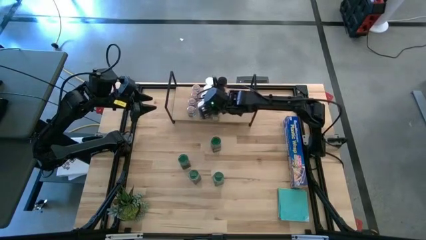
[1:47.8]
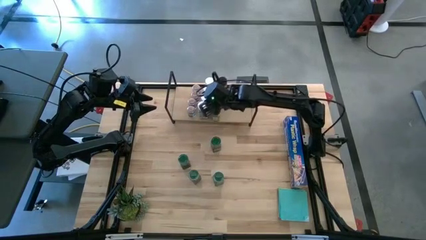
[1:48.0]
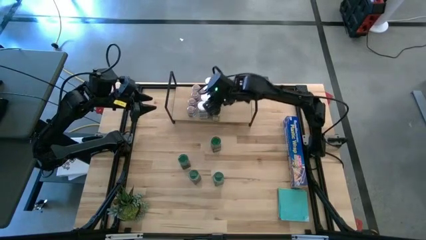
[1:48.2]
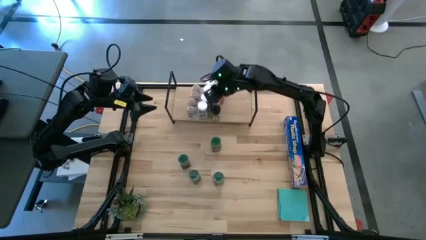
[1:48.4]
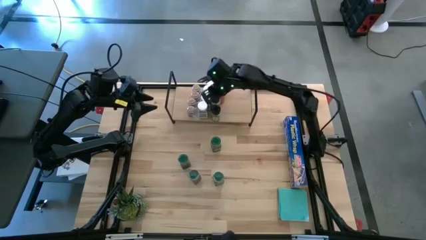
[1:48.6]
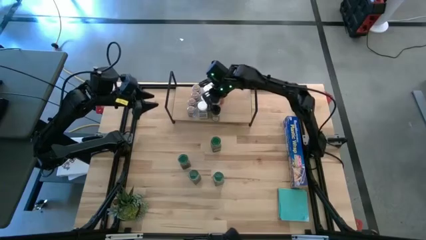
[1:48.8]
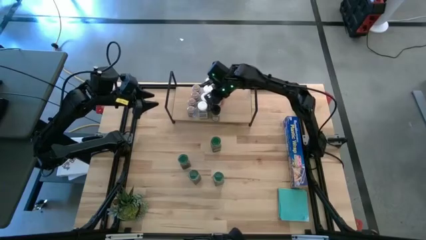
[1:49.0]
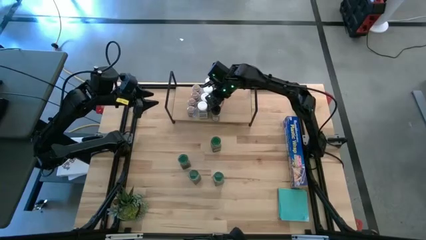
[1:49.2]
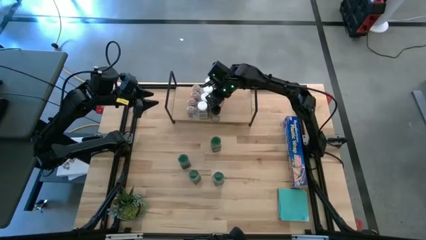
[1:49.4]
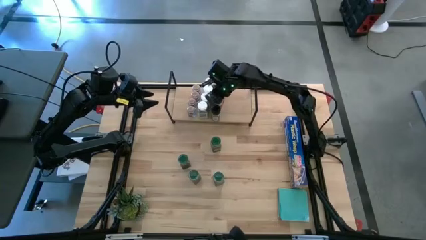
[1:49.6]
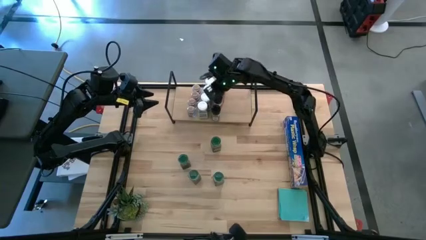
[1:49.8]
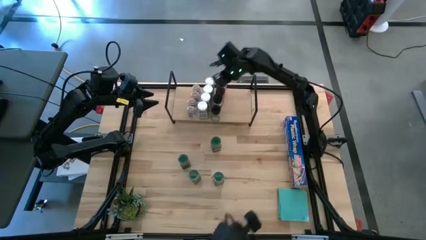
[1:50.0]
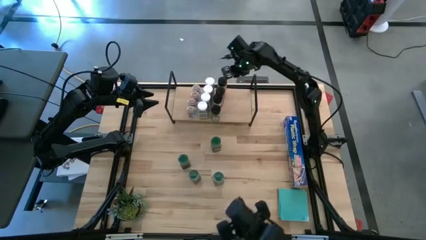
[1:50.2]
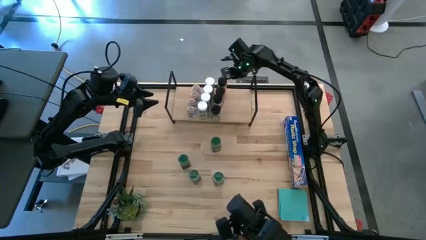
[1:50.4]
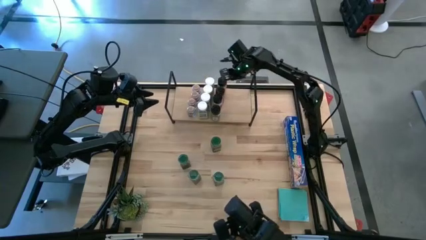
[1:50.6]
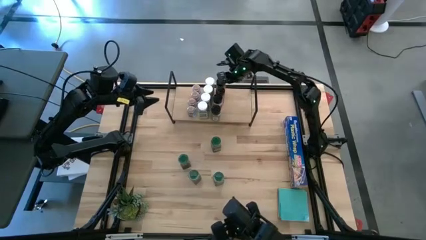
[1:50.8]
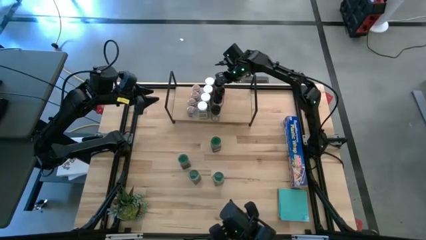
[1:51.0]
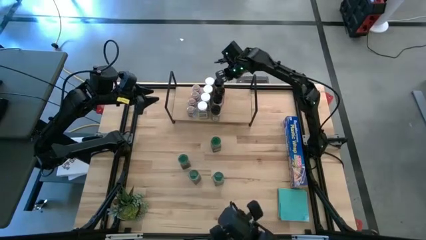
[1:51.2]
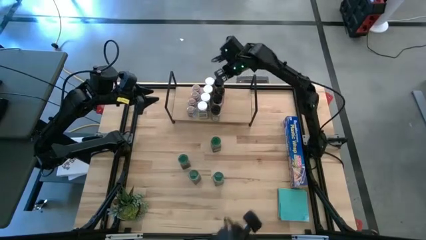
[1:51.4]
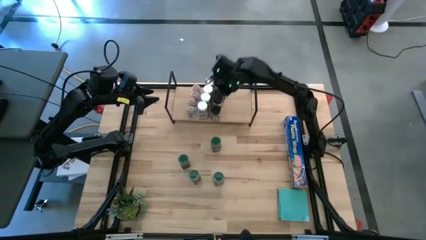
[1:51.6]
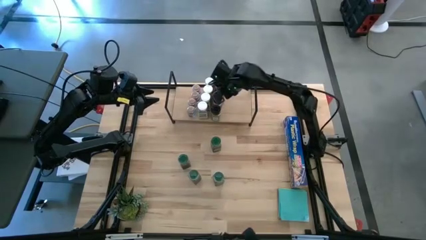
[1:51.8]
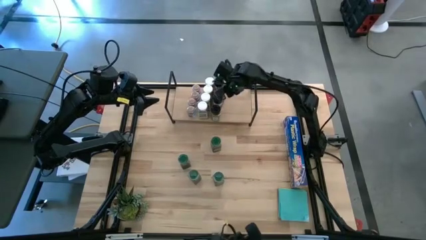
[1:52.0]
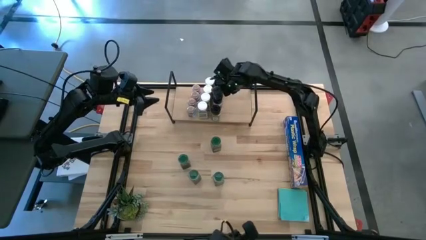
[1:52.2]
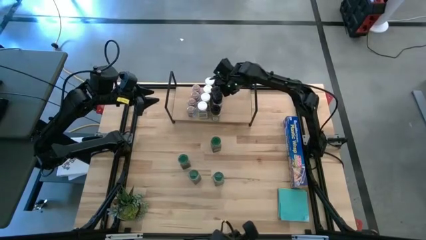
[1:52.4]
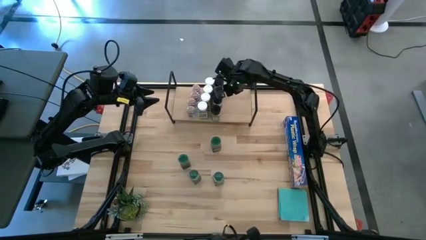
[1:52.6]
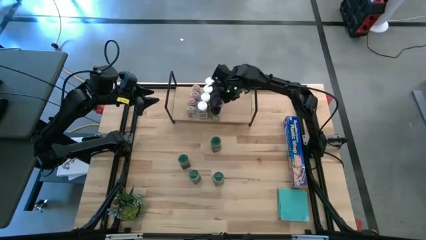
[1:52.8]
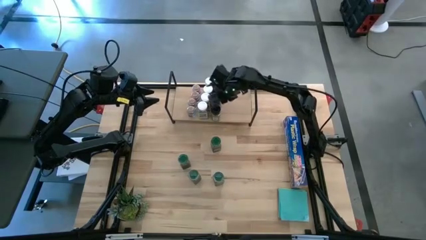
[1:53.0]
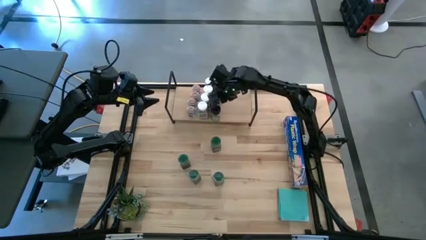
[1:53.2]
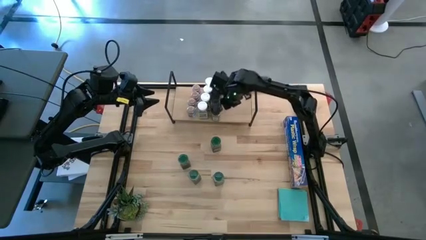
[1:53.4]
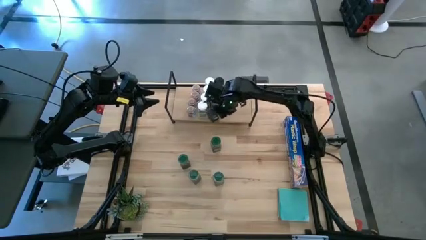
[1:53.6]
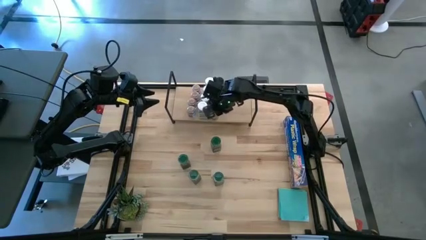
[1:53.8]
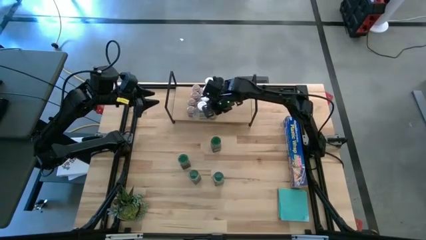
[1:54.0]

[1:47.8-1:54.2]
Task: Shelf spices
Adjust the black seasoning bottles on the shelf

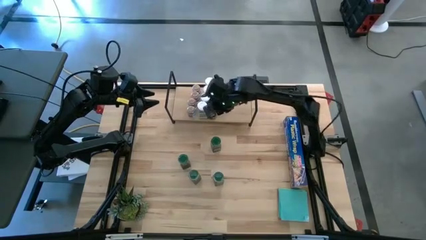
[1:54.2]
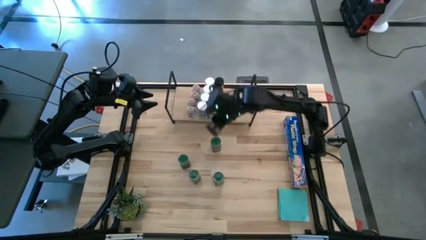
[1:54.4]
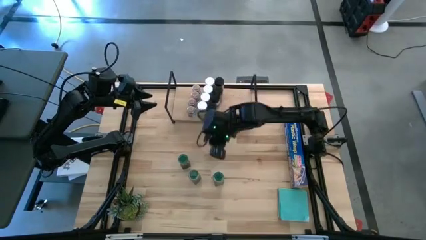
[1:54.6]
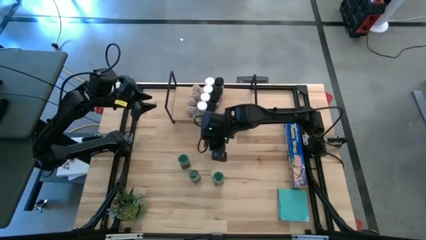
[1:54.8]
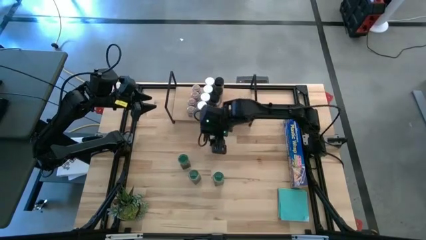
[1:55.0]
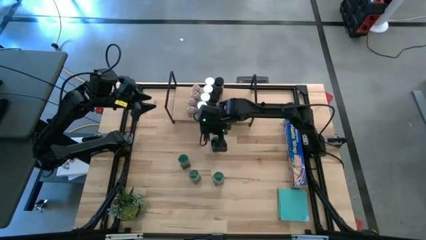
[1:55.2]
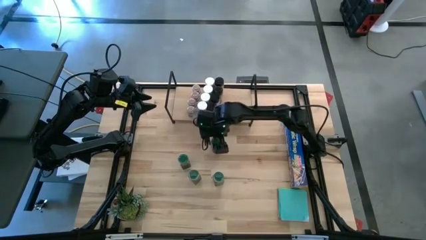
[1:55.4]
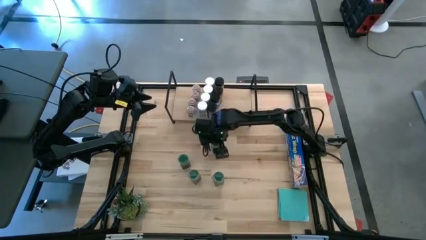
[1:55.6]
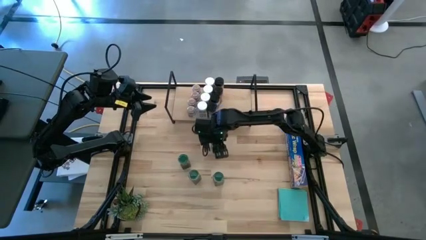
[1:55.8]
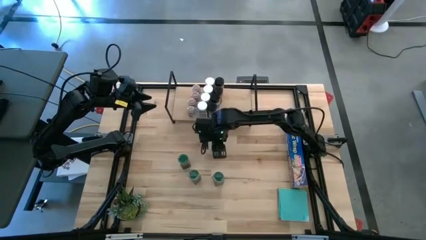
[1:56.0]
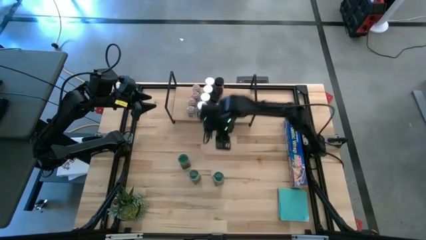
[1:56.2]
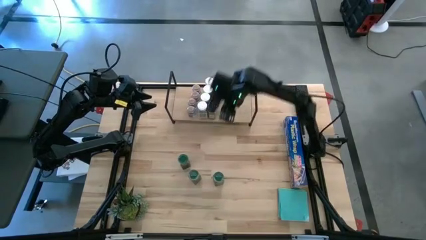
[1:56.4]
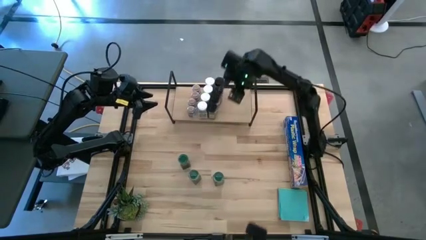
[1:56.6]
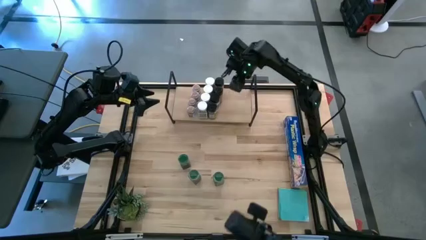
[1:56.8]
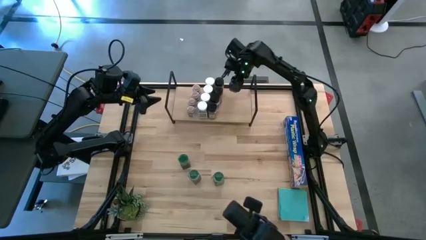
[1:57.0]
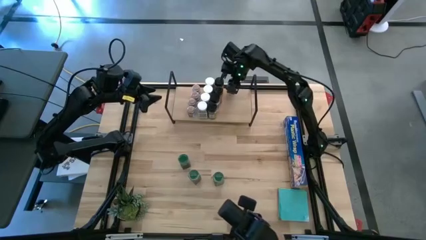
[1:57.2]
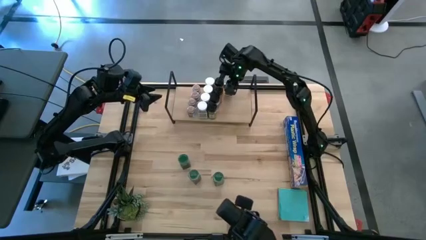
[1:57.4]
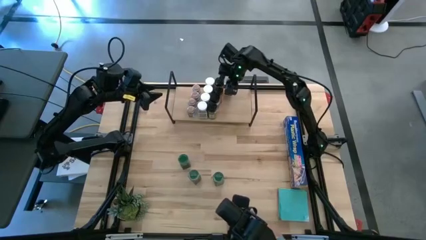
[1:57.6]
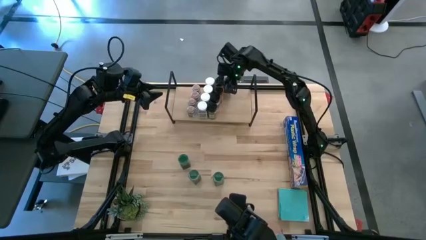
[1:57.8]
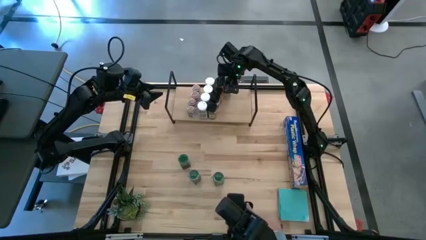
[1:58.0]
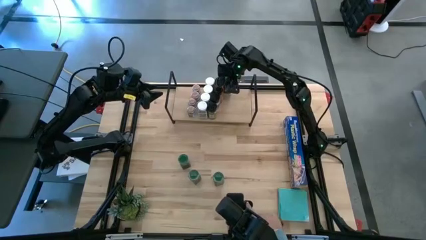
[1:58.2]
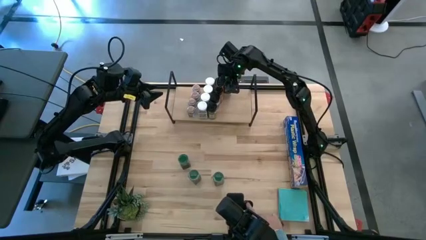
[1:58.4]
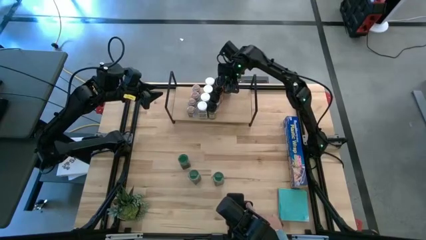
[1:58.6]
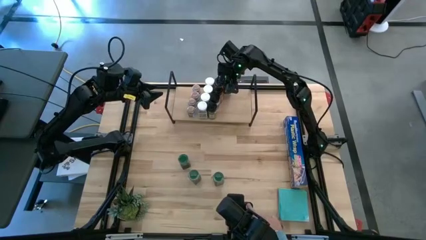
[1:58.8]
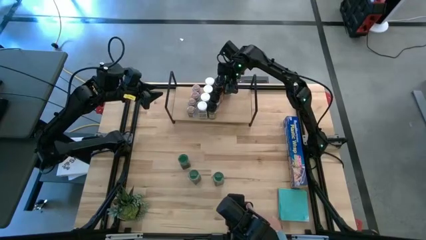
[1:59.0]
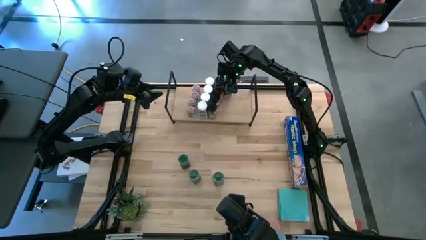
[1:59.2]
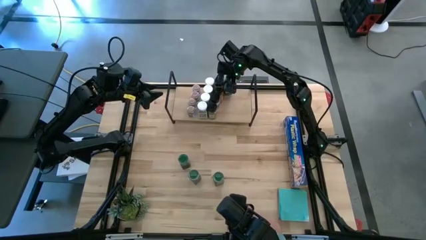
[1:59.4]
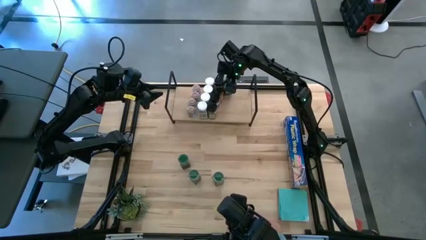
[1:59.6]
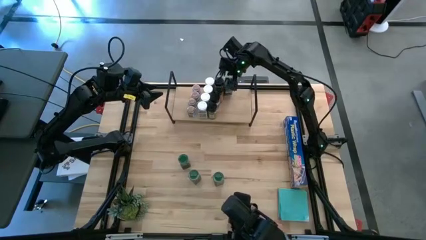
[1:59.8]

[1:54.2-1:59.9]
Put the top right green seasoning bottle on the shelf

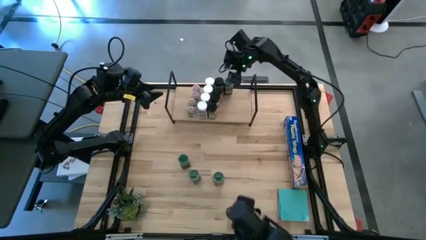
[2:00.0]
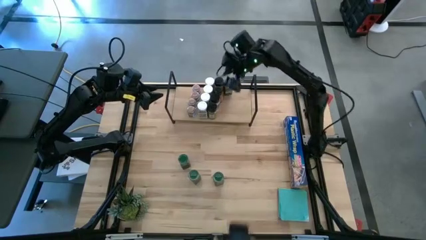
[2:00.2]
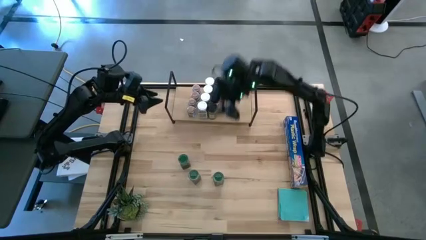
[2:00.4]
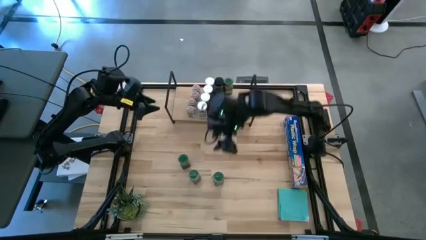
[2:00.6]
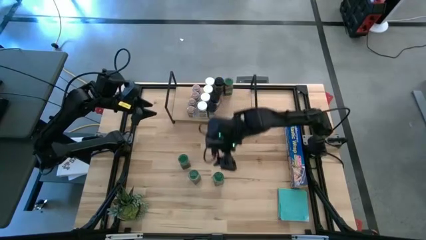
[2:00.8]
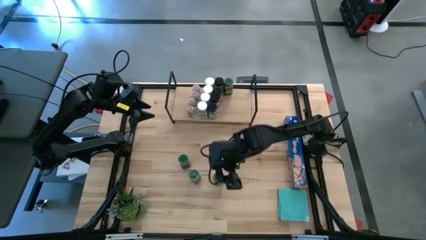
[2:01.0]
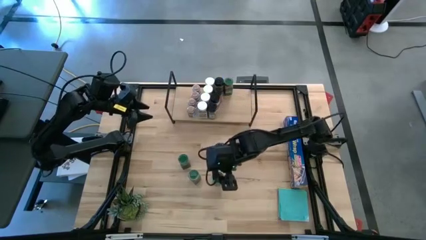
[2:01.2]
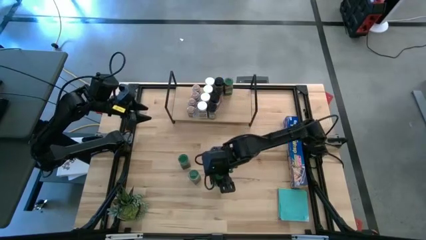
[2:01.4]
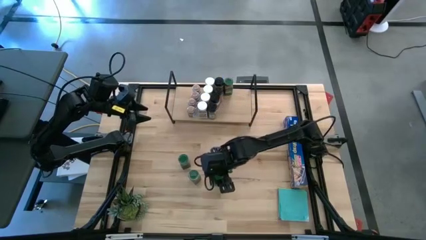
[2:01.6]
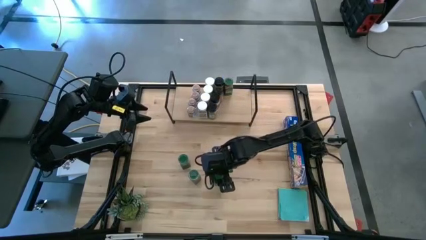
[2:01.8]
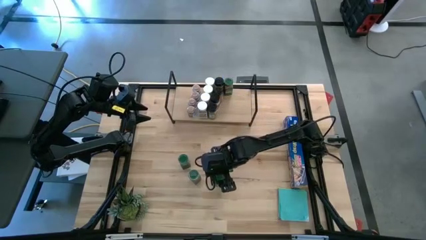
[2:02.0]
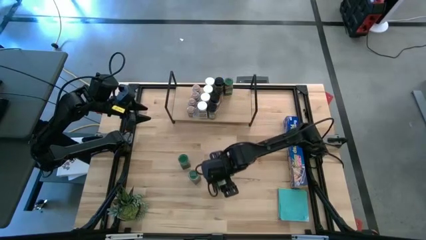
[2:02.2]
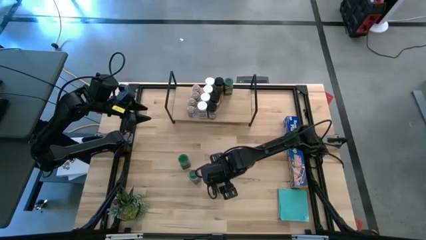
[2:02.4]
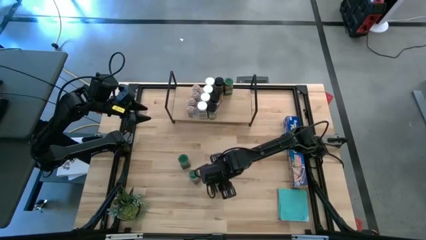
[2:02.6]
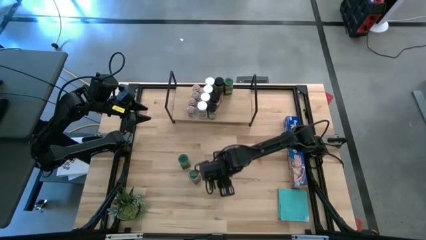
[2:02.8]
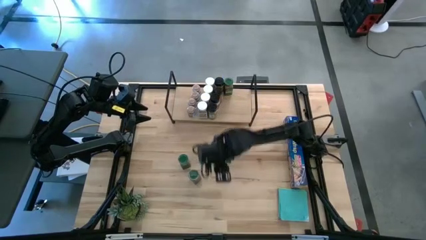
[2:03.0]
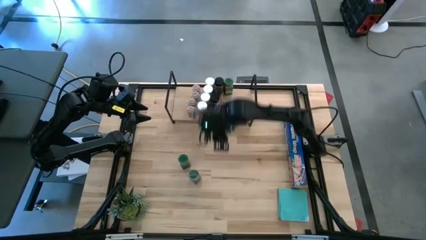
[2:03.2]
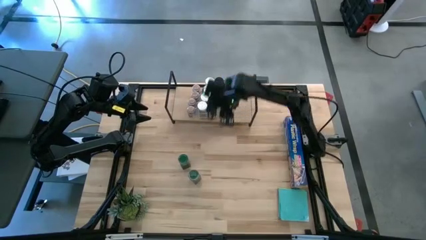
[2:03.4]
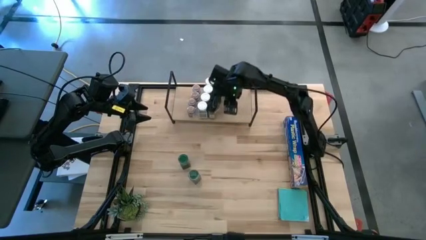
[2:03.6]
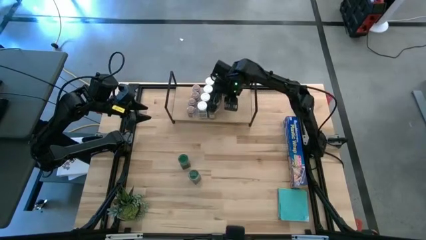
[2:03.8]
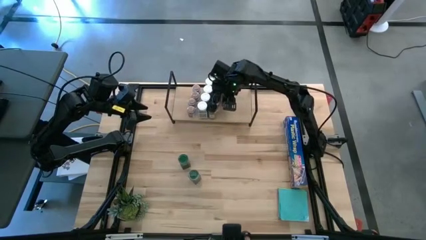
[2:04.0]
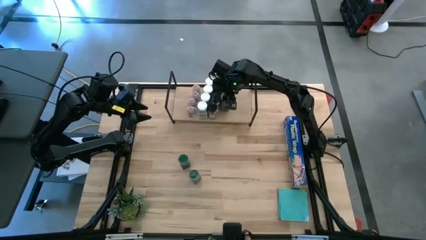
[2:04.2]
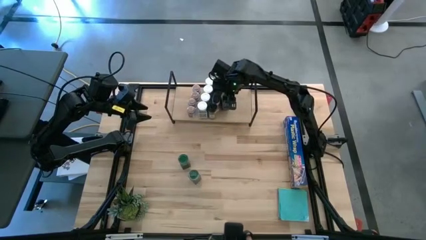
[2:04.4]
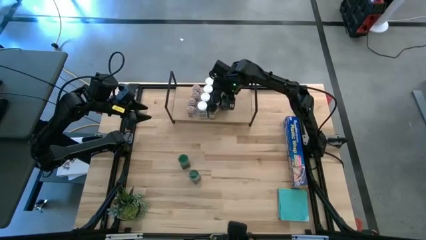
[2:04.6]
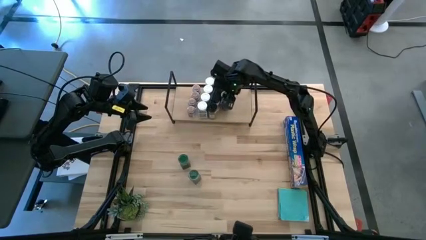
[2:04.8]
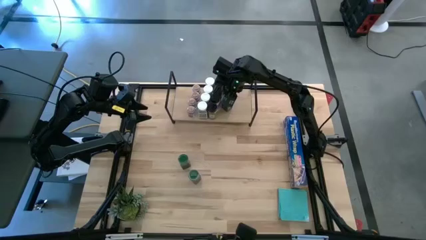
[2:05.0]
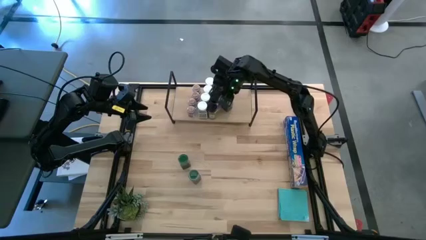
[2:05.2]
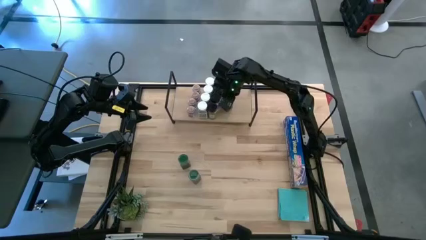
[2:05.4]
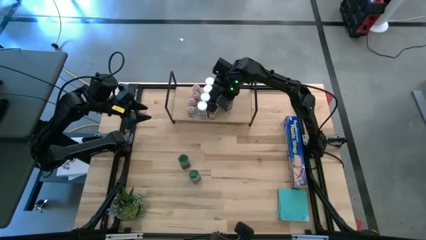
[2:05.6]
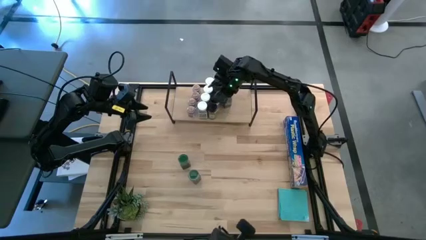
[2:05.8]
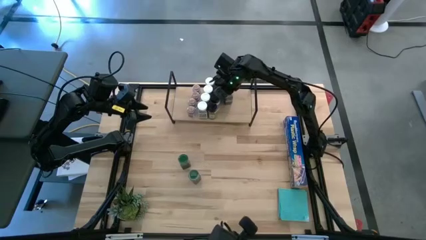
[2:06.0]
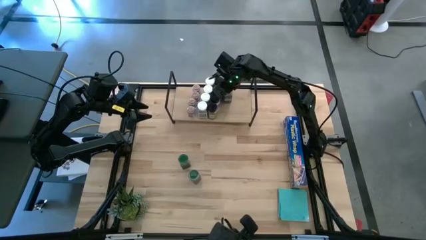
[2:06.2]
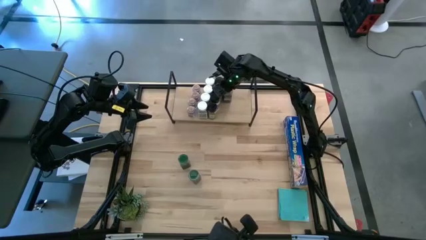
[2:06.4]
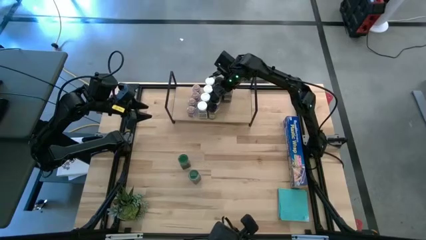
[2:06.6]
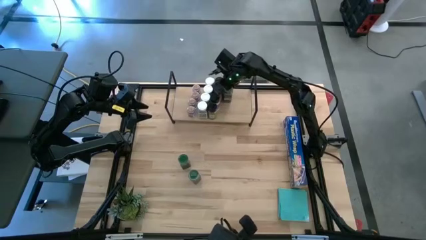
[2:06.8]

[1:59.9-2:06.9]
Put the bottom right green seasoning bottle on the shelf aligned with the other green seasoning bottle
